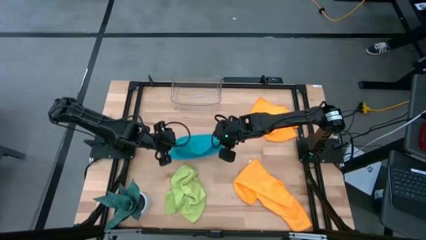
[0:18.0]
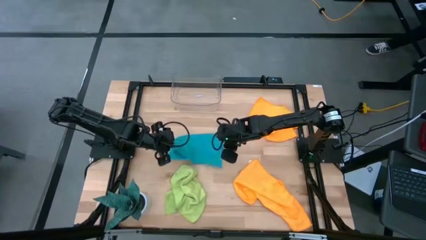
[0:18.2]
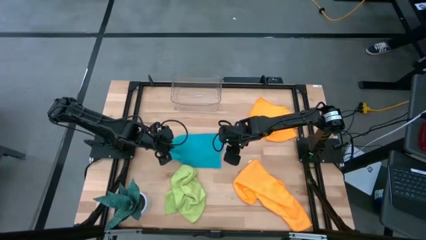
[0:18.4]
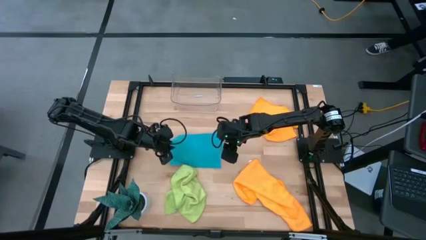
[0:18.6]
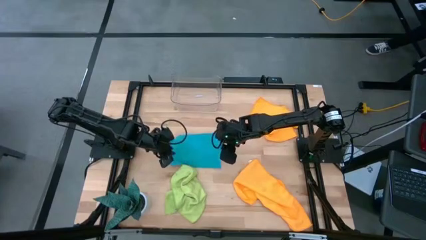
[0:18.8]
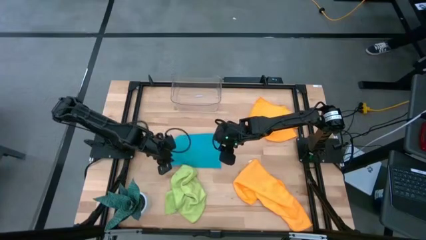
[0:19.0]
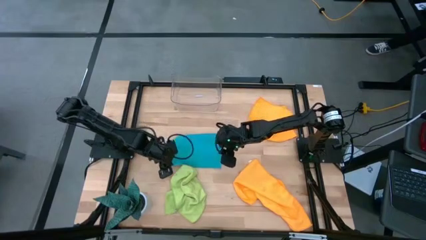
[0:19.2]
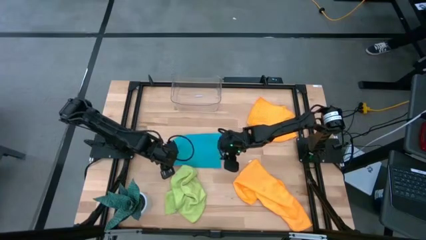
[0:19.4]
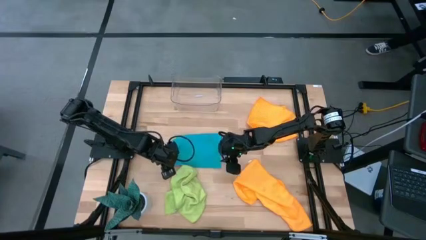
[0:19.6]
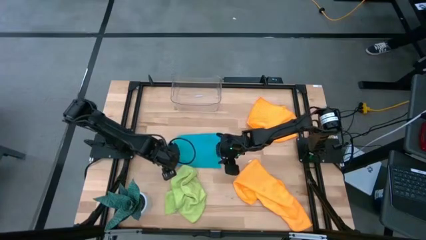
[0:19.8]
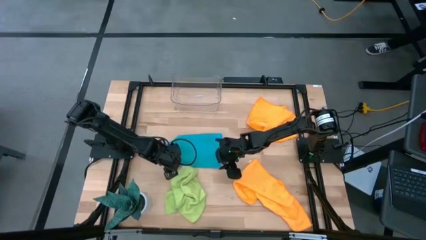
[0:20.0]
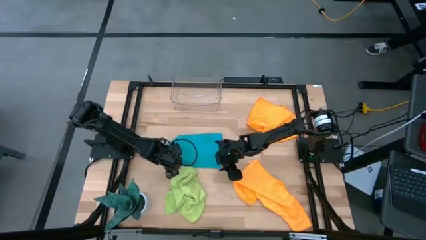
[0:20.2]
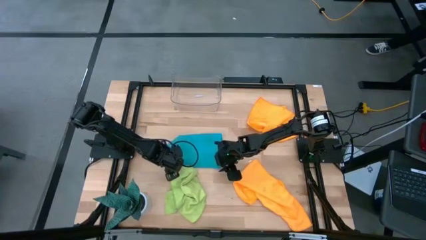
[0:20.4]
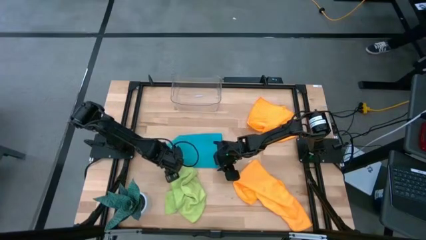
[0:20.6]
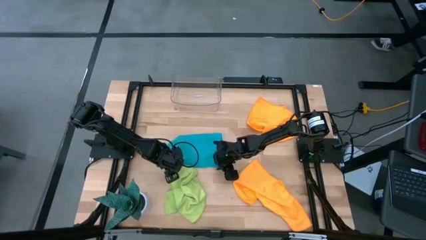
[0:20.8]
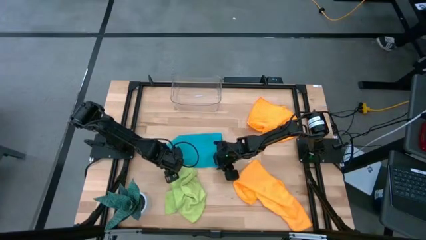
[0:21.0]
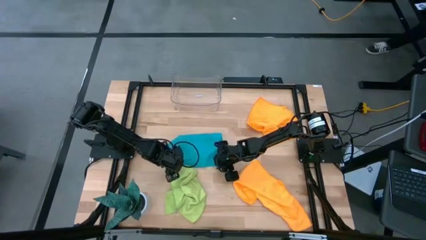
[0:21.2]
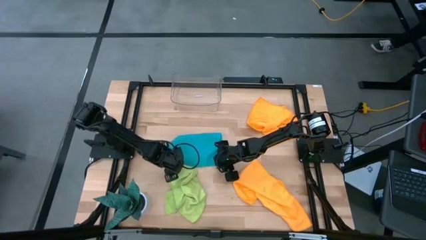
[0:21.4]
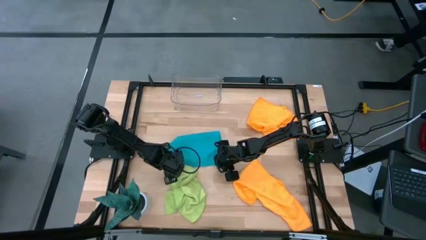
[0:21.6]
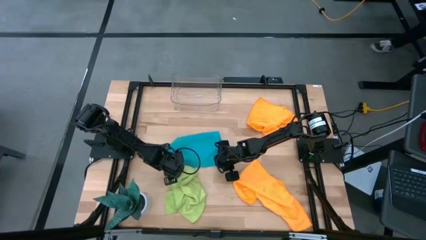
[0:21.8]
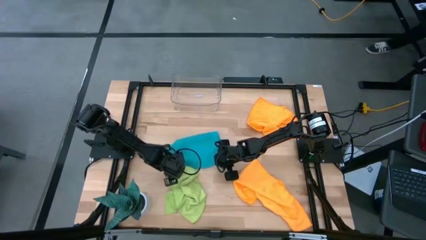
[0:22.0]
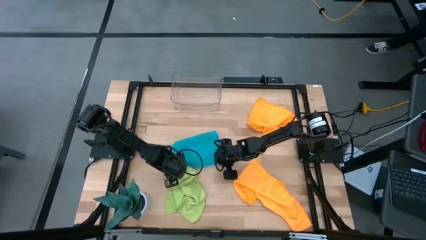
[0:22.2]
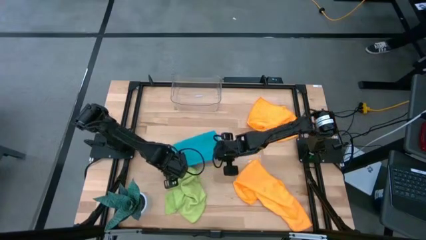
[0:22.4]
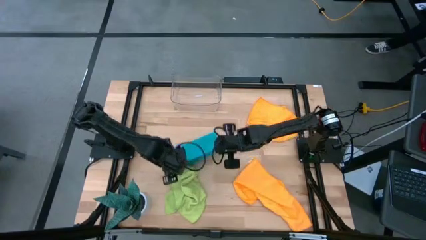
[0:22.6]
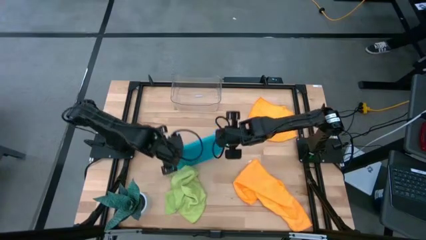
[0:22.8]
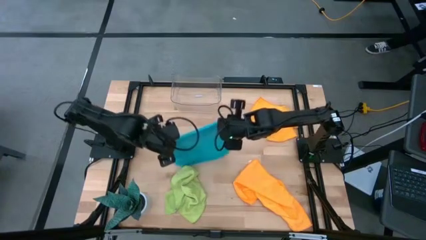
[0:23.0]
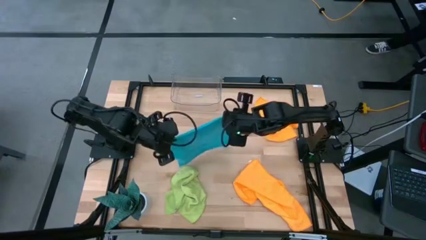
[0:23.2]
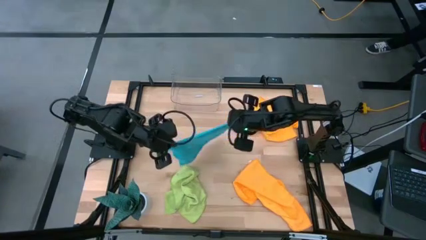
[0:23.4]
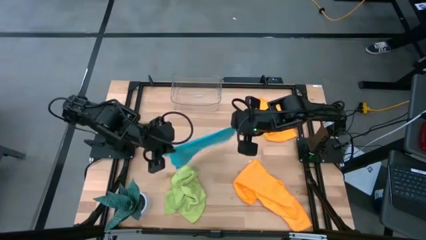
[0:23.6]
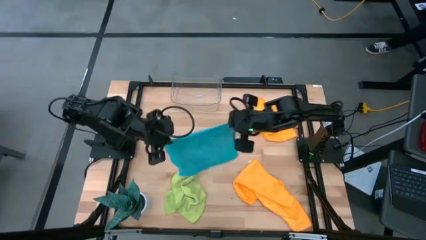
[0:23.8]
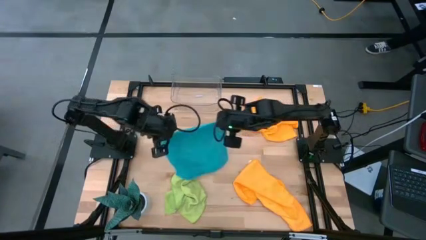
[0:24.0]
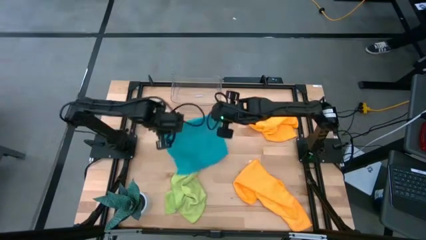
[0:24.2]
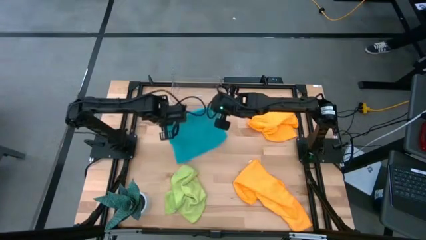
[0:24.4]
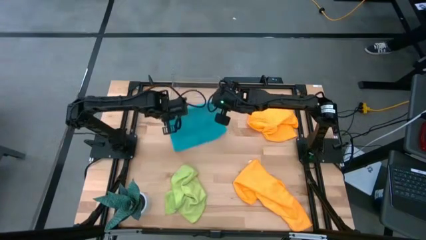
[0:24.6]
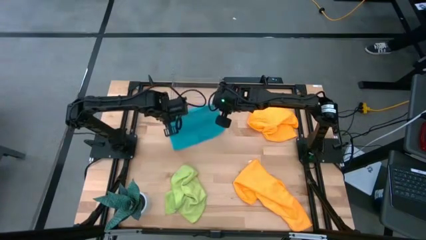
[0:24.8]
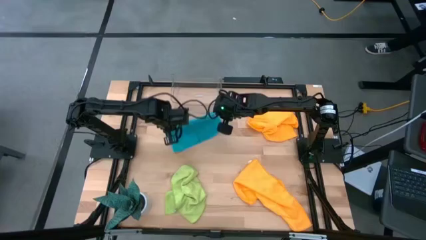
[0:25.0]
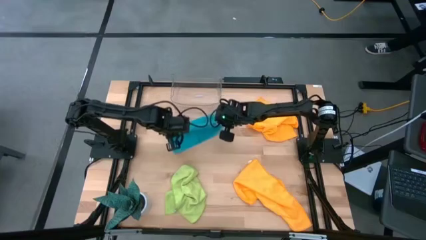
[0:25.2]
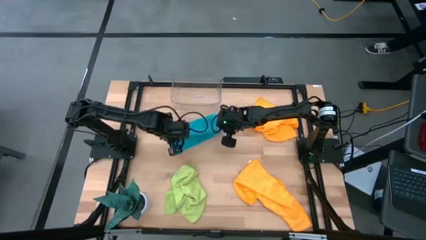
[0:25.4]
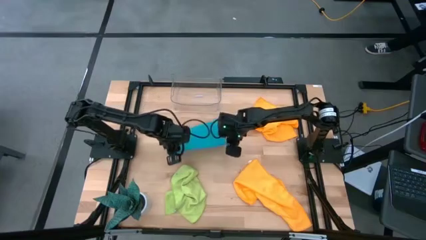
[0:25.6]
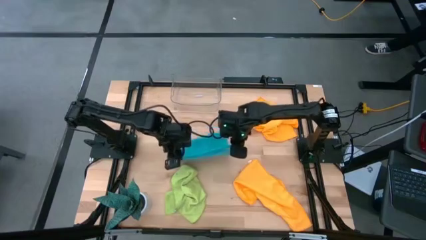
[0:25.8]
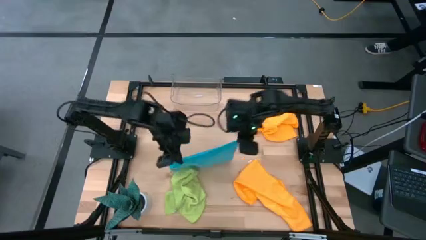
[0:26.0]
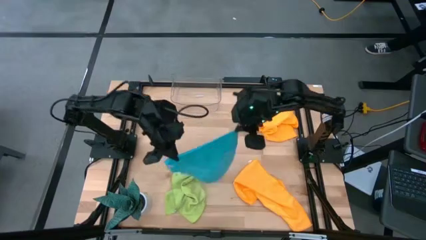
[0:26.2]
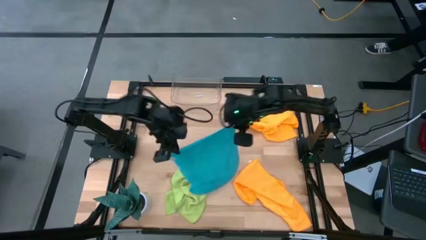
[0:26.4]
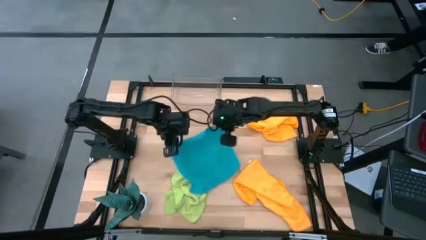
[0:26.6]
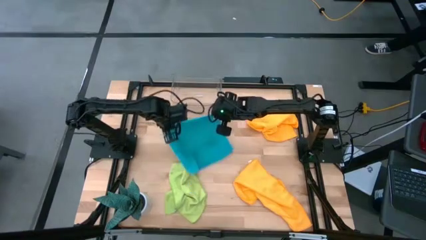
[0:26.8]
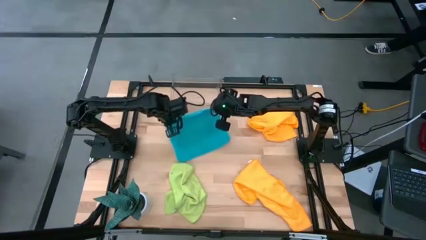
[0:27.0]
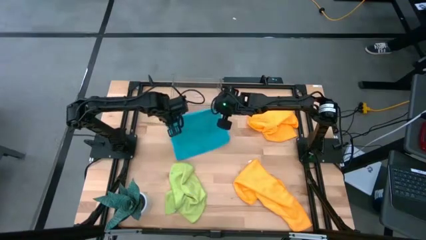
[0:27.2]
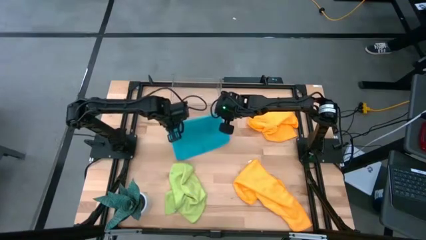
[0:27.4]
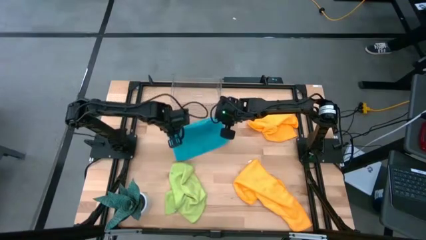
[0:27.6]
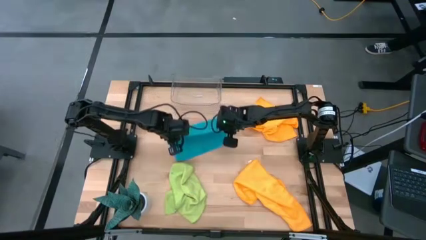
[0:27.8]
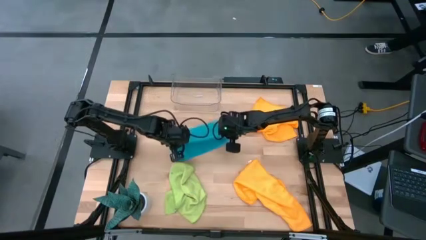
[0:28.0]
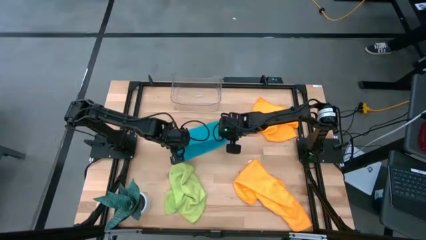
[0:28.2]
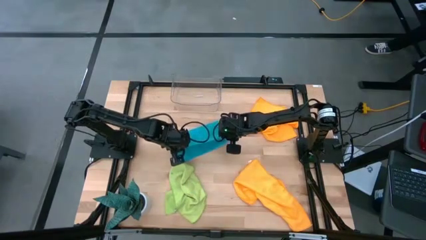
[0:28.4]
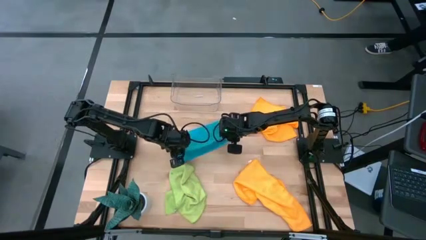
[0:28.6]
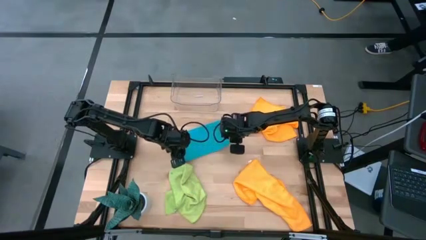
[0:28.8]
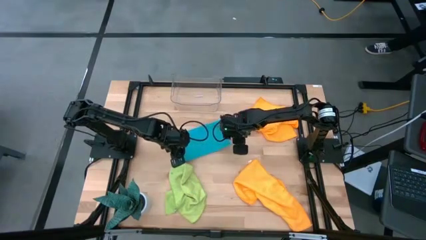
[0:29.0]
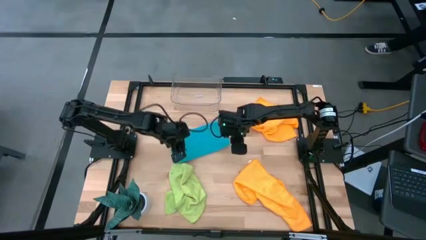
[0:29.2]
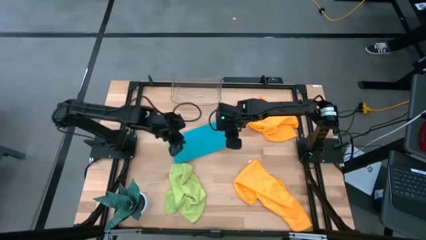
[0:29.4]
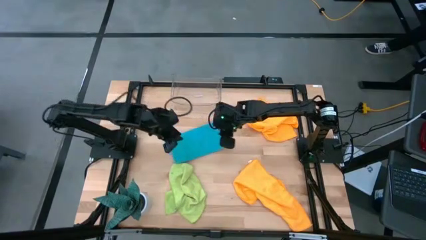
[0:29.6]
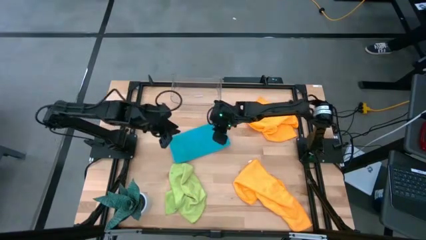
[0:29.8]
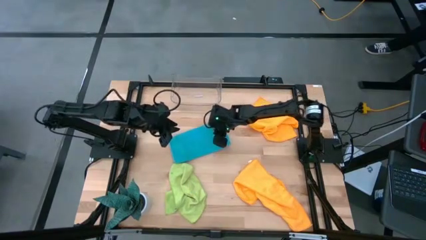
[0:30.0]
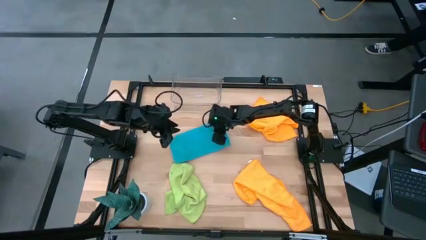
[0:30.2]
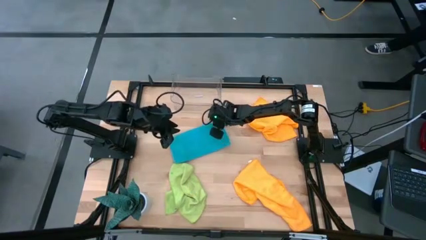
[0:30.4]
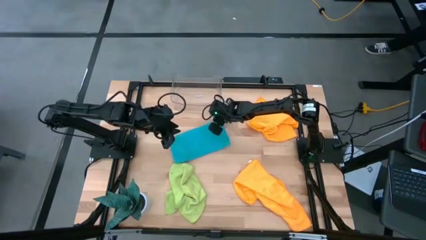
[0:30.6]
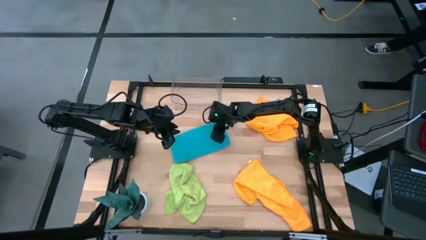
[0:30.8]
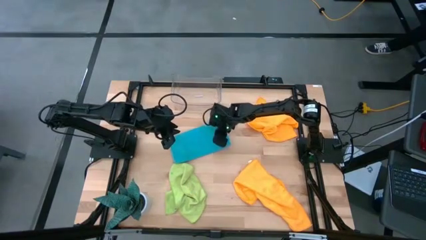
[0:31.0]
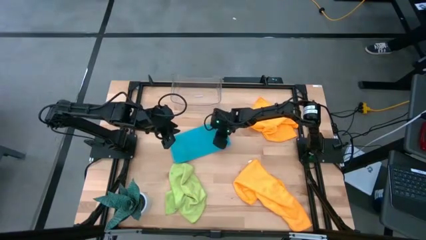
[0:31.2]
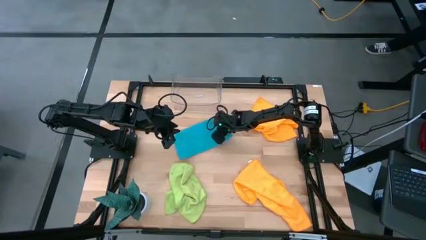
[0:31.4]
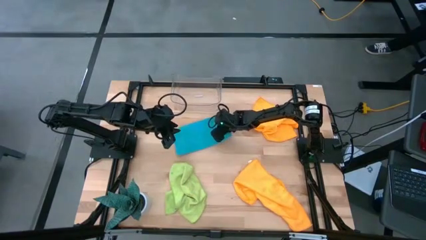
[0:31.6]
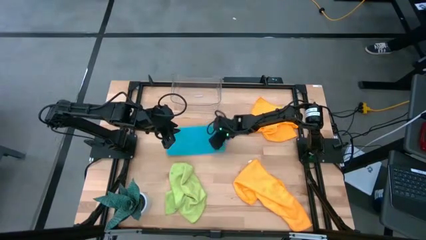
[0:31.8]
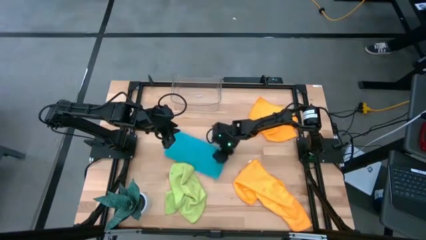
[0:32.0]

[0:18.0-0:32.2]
Task: Fold microfiber towels
Fold the blue microfiber cloth

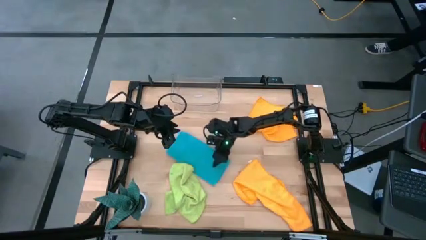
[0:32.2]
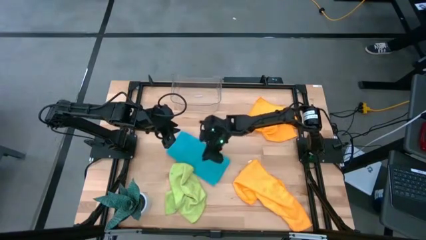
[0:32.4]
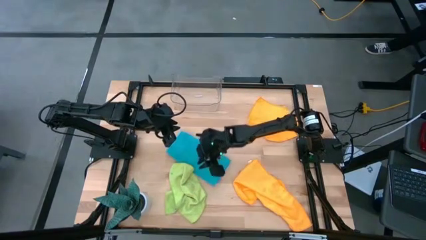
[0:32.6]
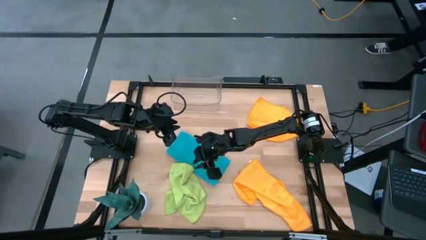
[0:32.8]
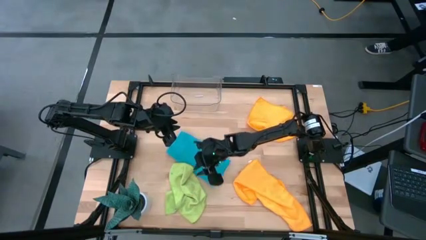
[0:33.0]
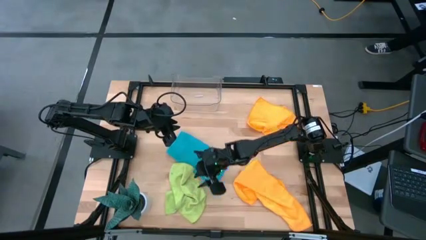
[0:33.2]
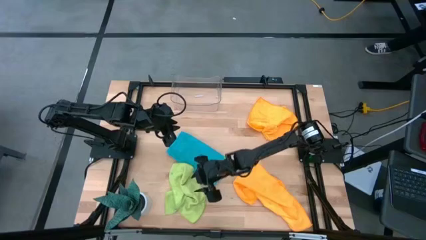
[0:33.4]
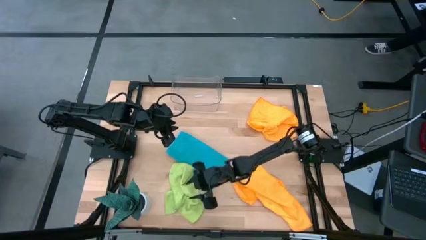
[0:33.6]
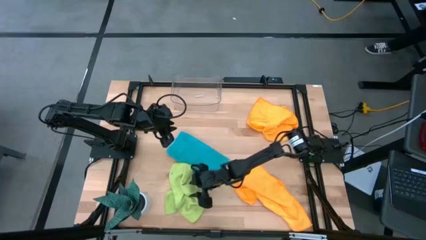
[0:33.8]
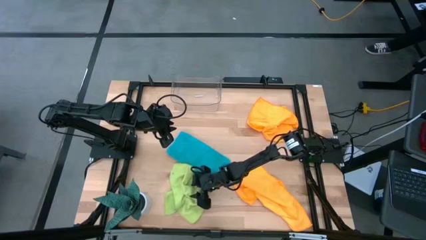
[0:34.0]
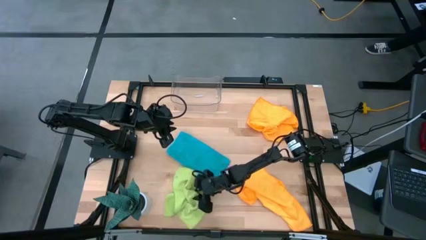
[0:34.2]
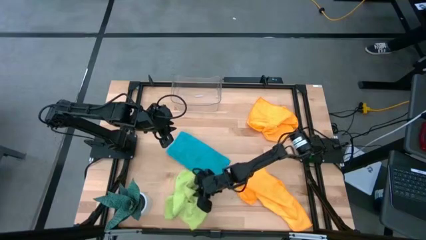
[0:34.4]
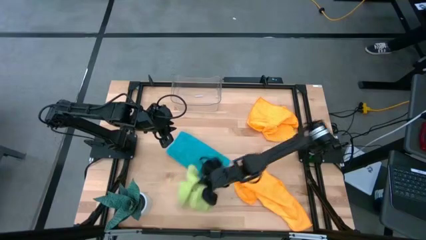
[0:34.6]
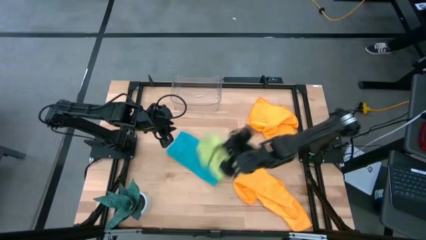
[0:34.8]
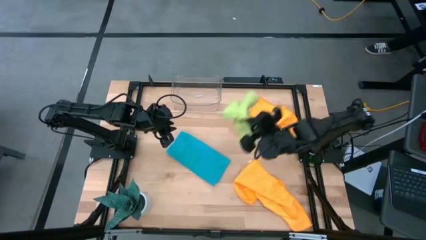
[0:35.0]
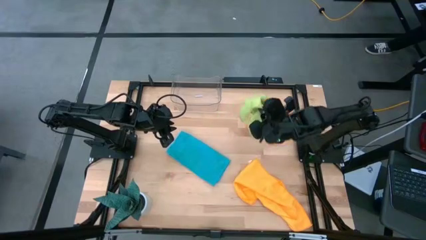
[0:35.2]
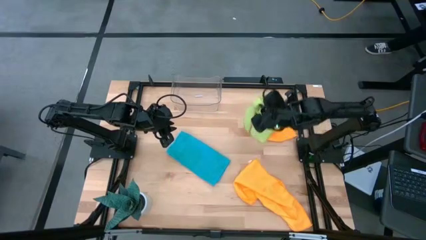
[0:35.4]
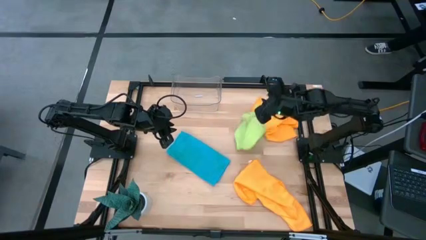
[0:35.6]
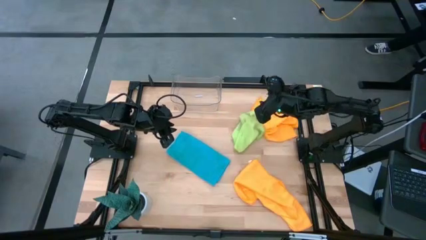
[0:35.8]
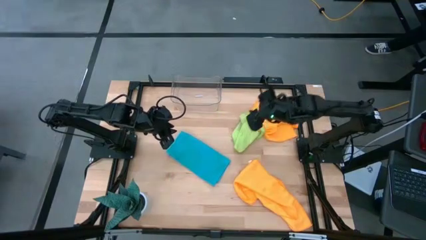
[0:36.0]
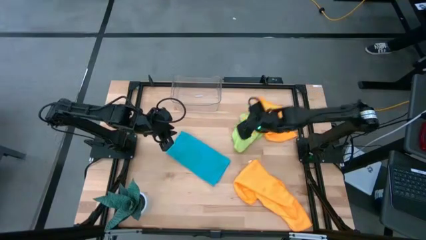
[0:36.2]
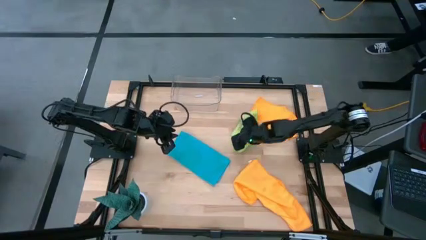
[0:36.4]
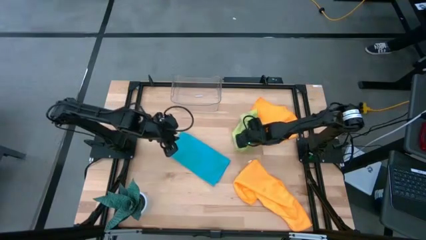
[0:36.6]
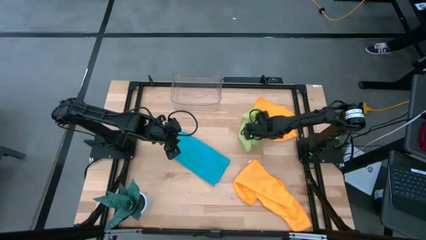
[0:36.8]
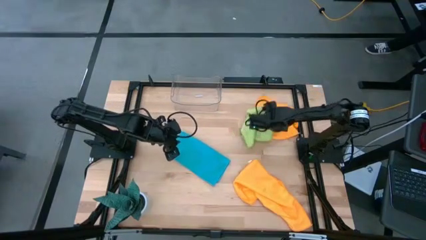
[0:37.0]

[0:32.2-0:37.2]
Move the green microfiber cloth to the top right of the table
